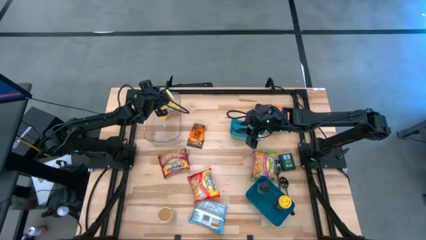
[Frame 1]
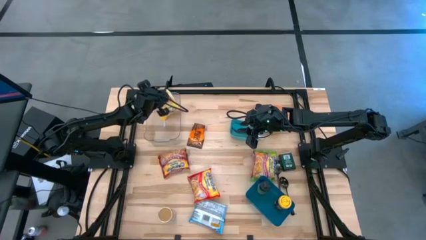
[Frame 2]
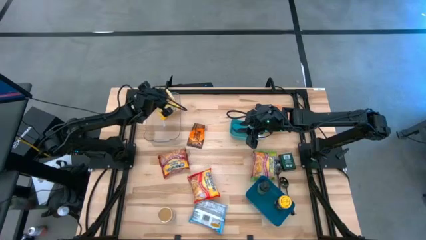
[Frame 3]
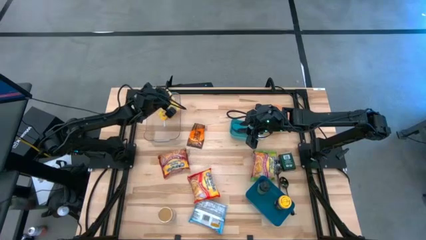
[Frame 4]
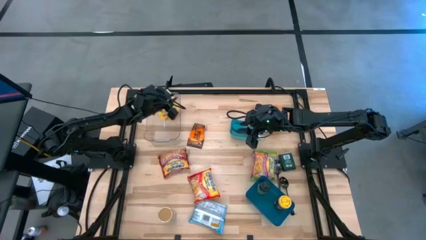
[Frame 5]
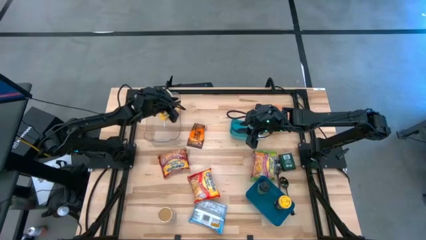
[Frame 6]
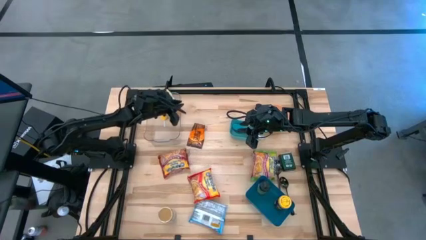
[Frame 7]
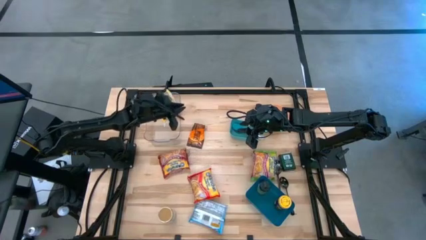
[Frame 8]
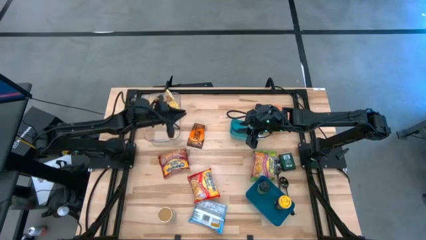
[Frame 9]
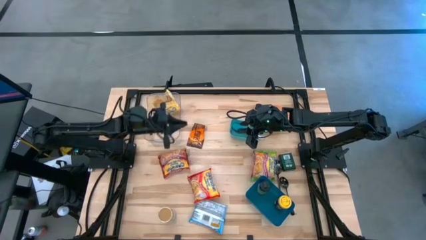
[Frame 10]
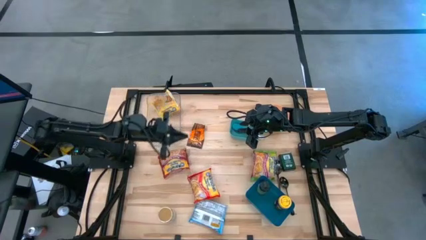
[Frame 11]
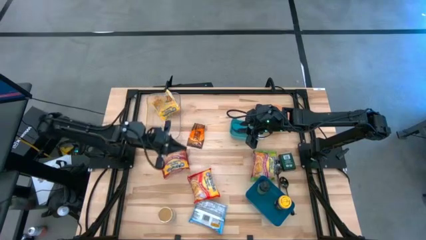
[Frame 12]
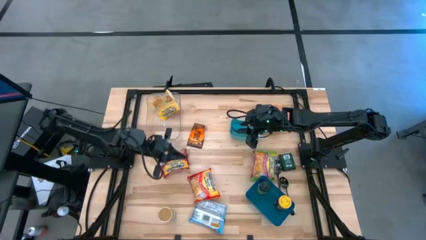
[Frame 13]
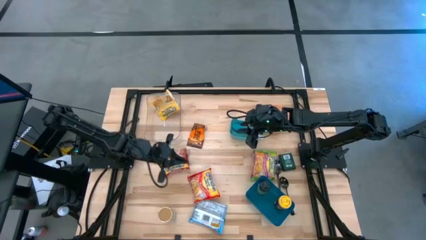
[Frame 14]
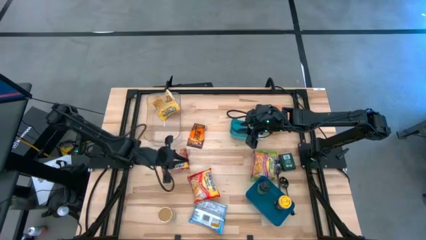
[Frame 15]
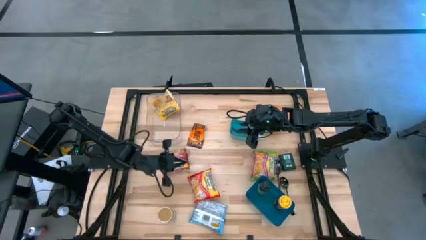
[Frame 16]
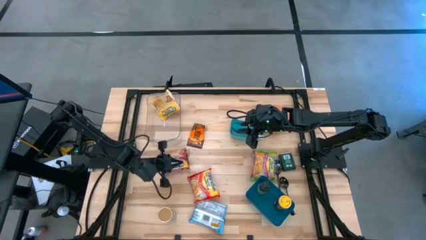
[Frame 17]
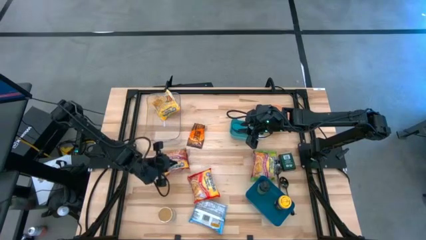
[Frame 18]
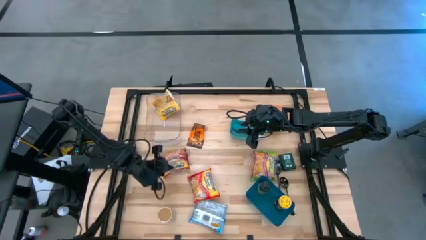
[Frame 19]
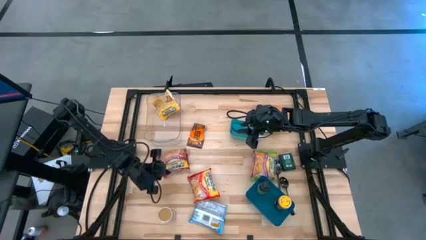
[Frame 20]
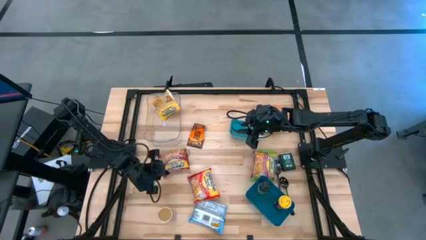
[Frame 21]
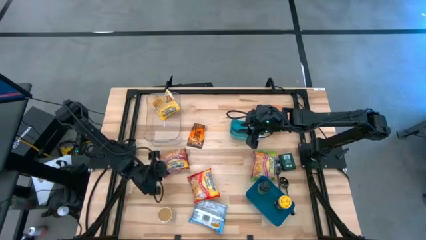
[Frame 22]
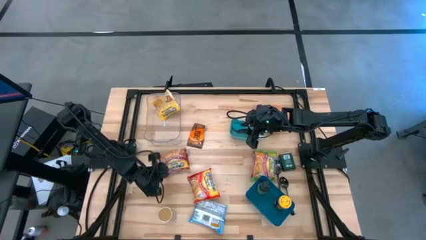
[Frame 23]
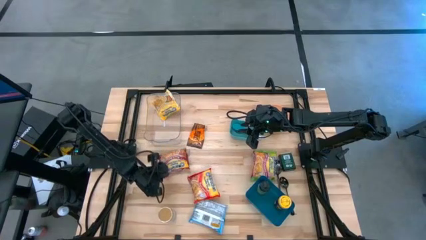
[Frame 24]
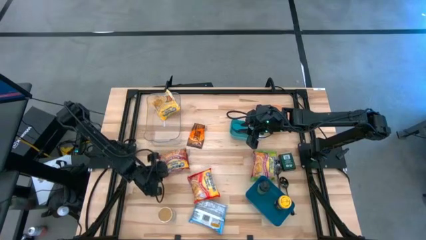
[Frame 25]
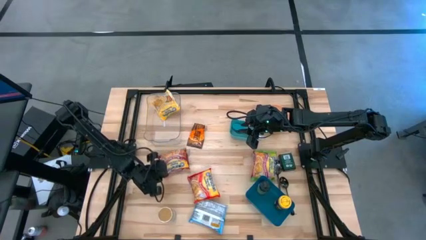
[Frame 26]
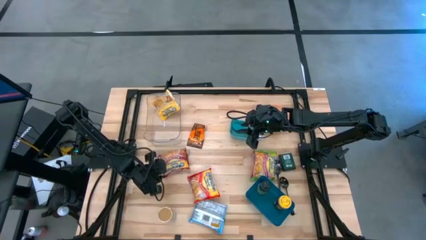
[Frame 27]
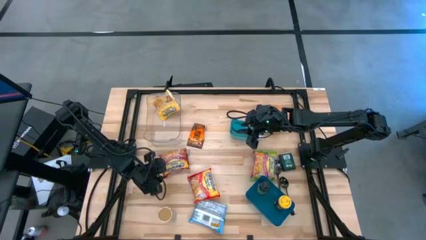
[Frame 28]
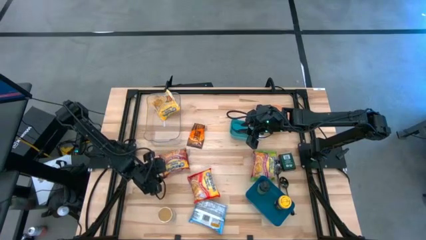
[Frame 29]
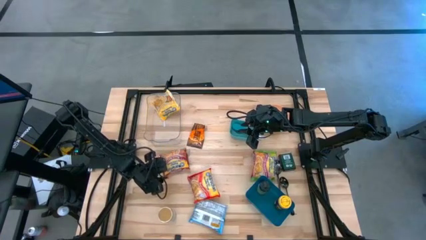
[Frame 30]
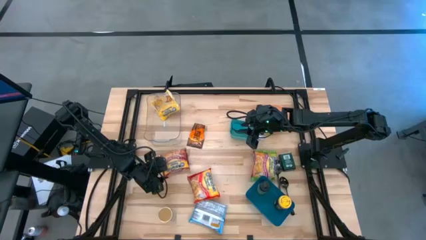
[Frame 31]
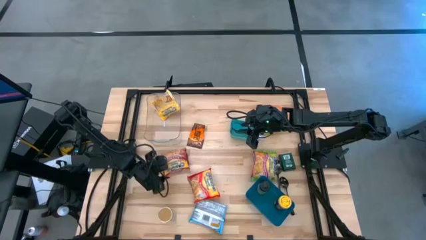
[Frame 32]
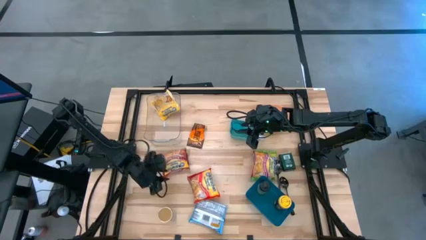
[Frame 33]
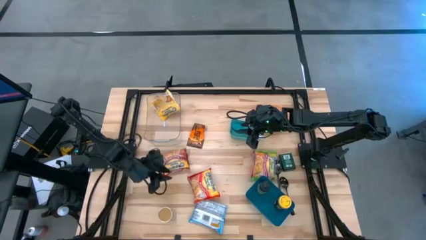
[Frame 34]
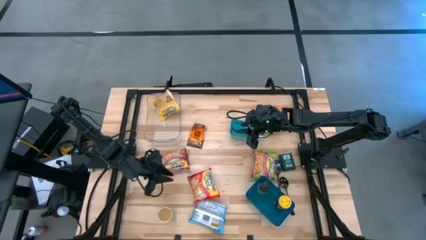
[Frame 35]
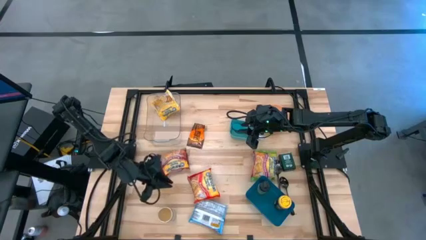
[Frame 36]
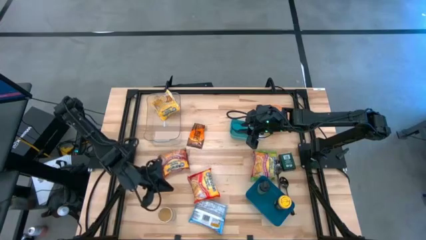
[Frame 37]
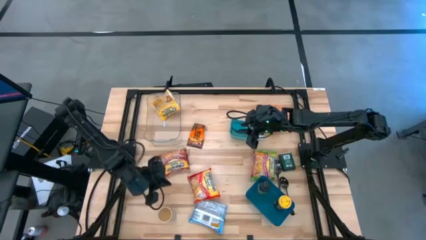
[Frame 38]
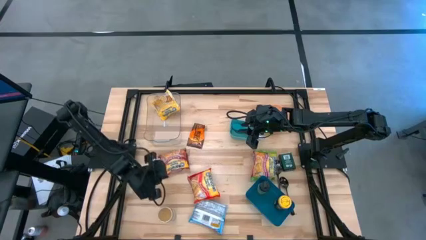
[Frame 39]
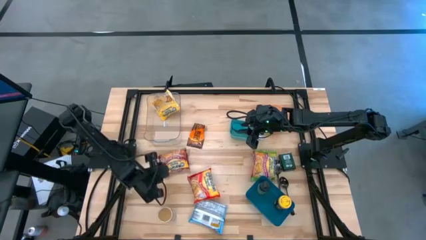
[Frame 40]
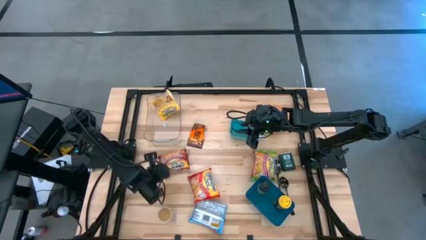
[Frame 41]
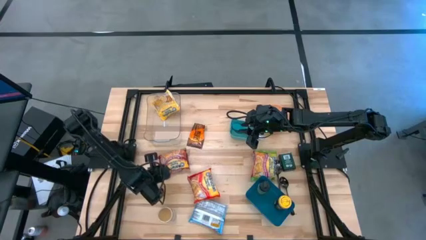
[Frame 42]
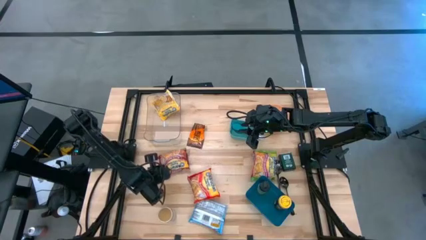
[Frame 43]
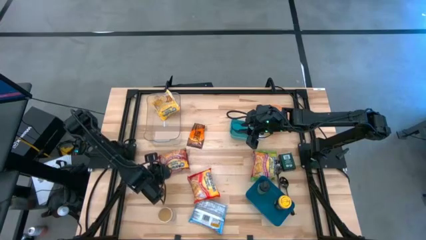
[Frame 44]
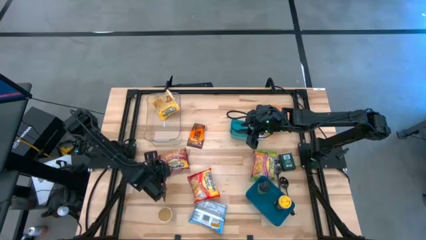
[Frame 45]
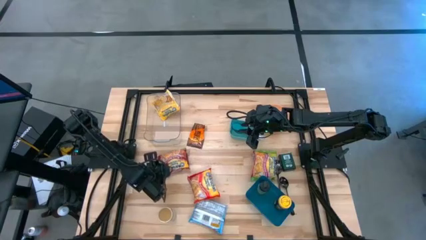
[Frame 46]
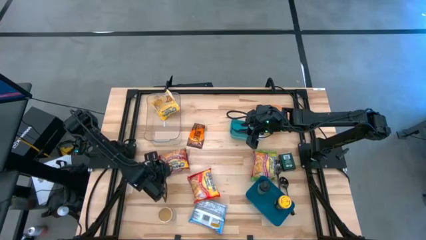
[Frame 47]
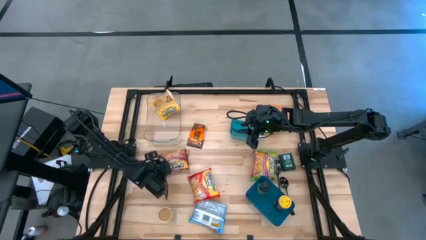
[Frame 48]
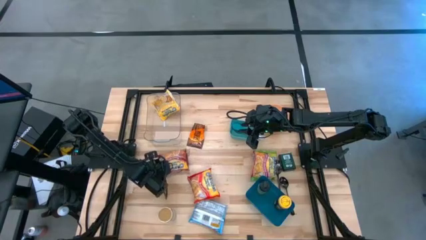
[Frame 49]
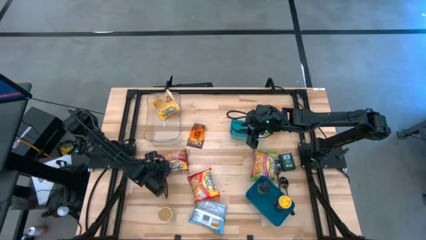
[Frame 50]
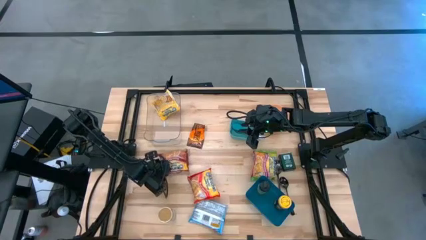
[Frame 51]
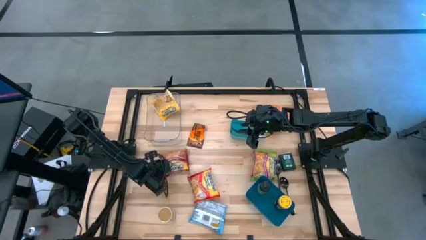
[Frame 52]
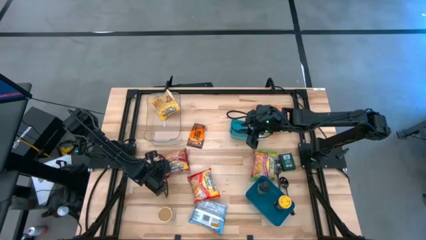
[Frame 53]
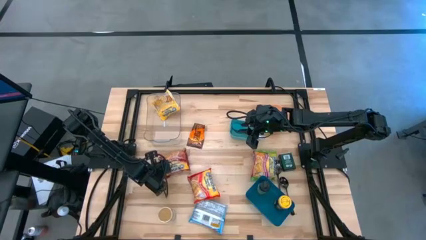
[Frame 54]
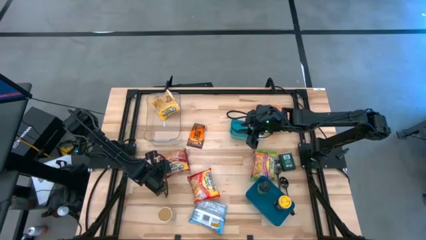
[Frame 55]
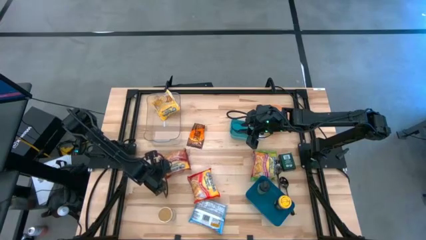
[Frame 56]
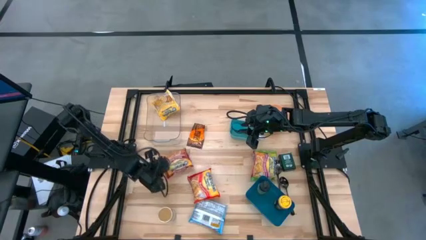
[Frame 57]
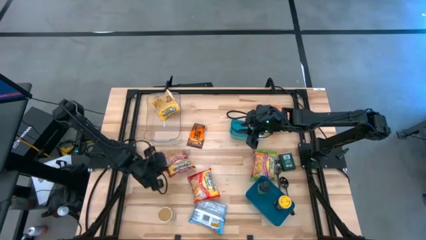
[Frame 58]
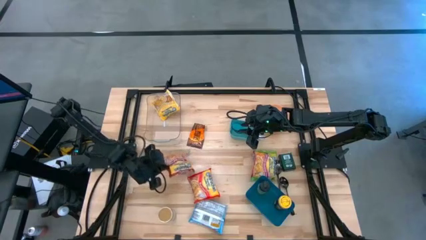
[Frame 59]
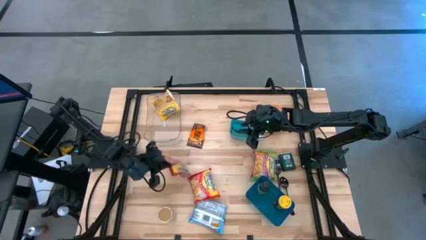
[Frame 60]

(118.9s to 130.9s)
Task: Pick & Place Food Item
Put the red noodle pack into the transparent bin

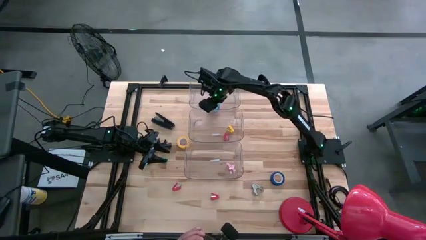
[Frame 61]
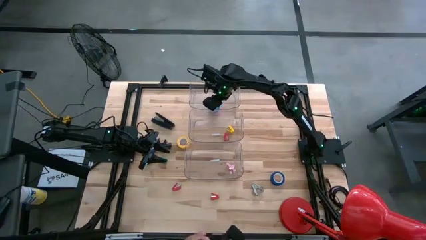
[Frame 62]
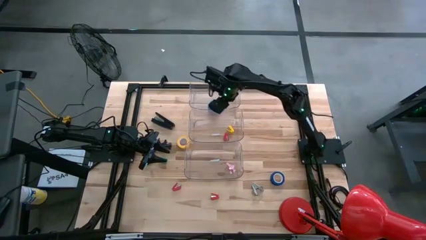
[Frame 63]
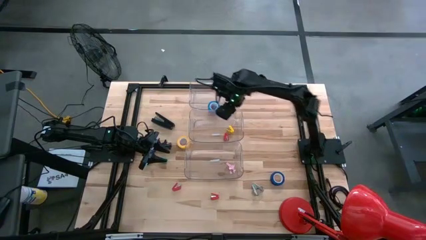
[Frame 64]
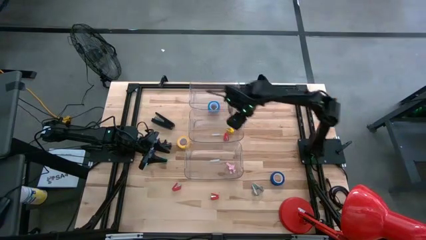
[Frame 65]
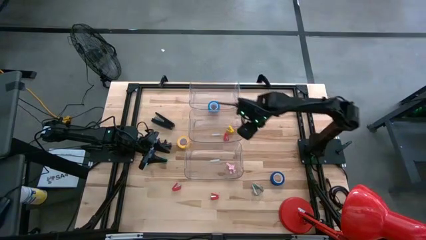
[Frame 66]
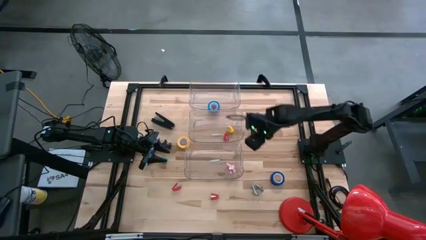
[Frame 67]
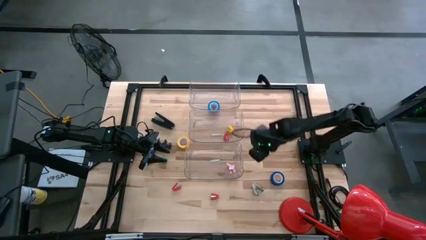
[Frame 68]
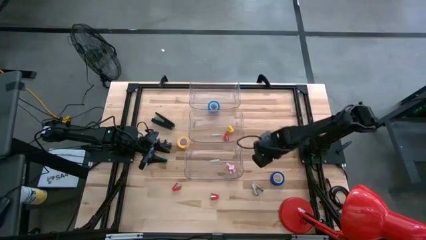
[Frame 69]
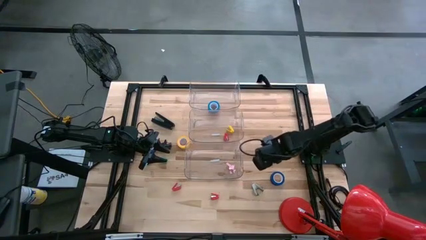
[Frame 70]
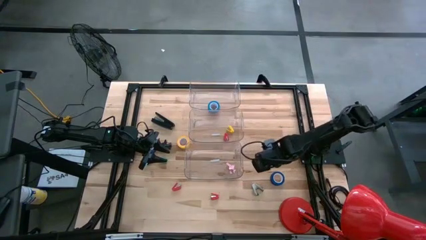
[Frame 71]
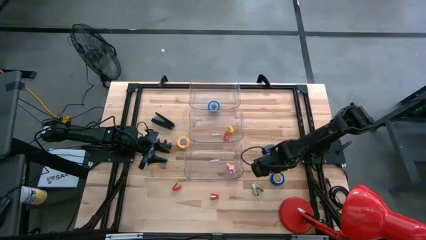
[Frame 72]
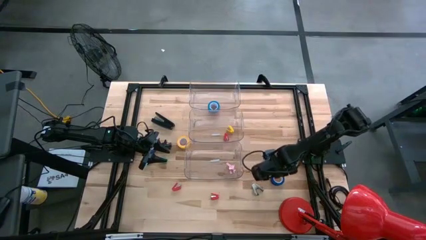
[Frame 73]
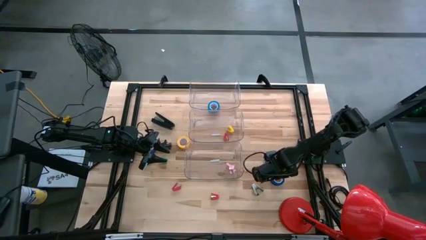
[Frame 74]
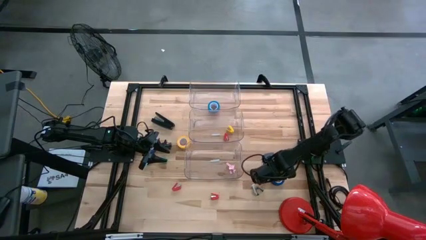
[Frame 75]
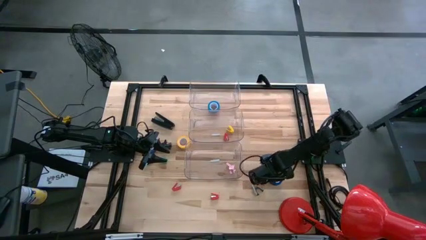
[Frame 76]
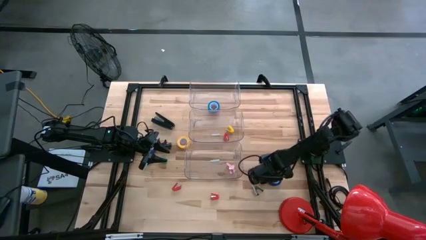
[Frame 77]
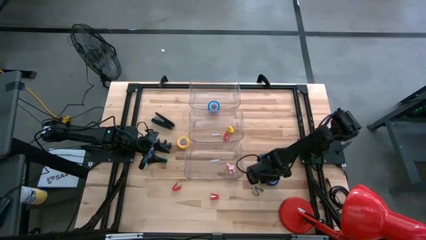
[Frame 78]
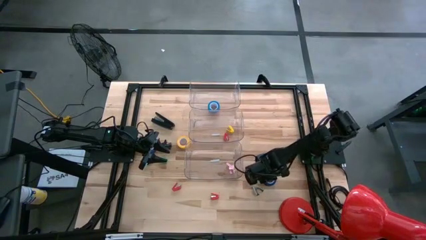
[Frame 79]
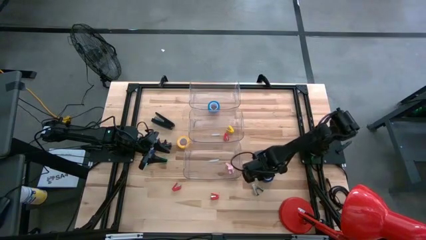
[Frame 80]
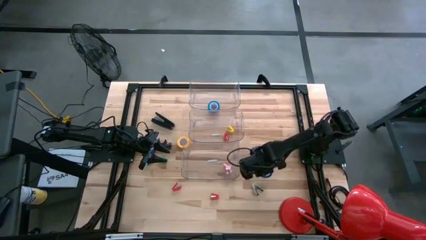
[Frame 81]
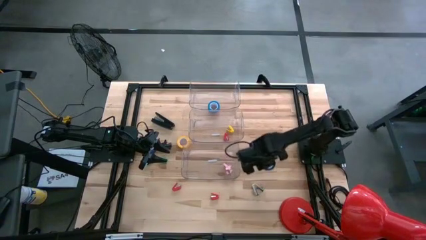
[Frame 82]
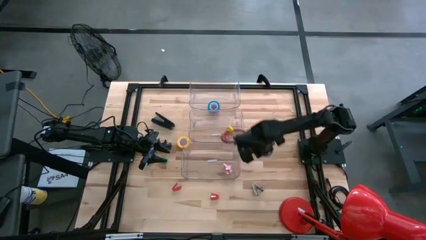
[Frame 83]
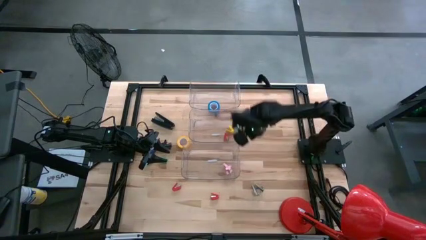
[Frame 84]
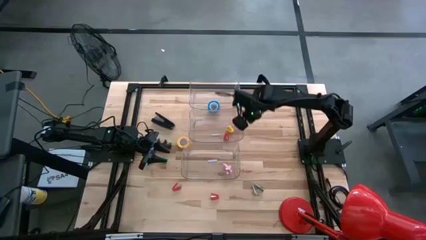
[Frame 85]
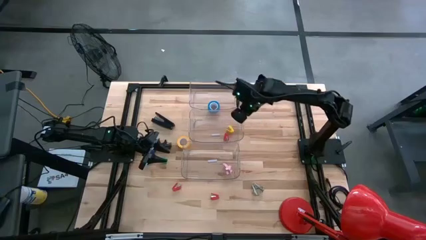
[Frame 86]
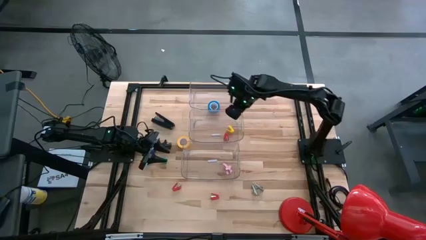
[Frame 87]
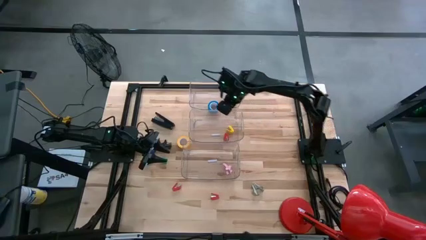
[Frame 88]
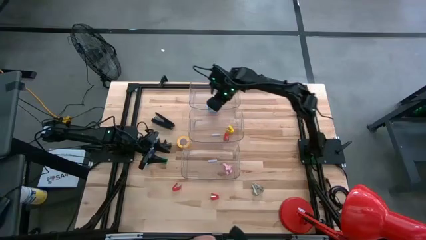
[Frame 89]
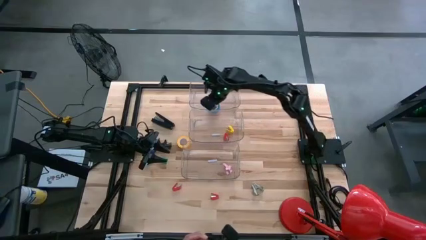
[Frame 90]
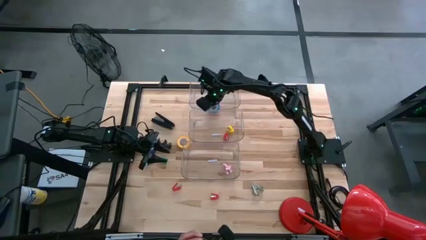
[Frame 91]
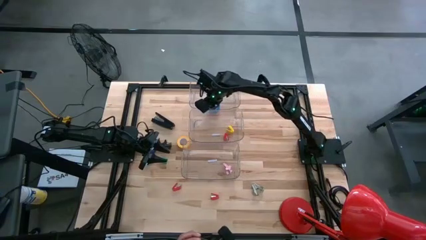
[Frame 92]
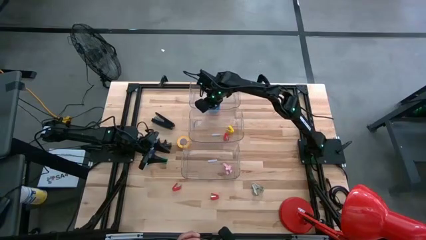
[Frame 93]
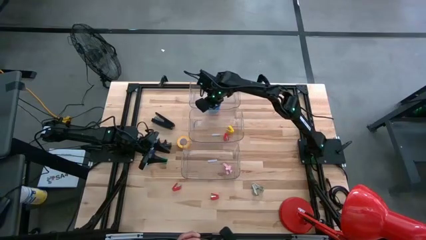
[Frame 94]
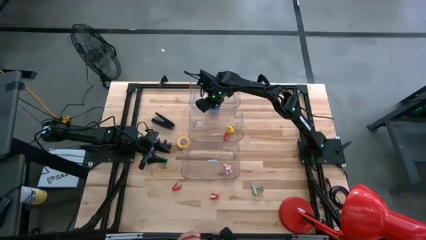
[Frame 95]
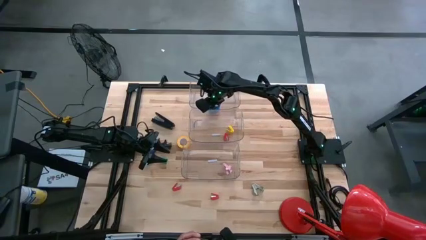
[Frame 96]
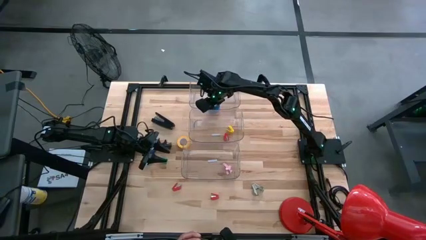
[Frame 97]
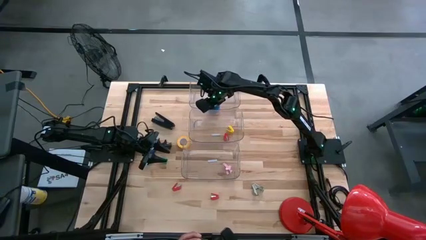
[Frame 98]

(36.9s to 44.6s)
Task: Pick and place Stapler, Stapler remover, tape
Put the bottom dark blue tape into the top transparent bin
